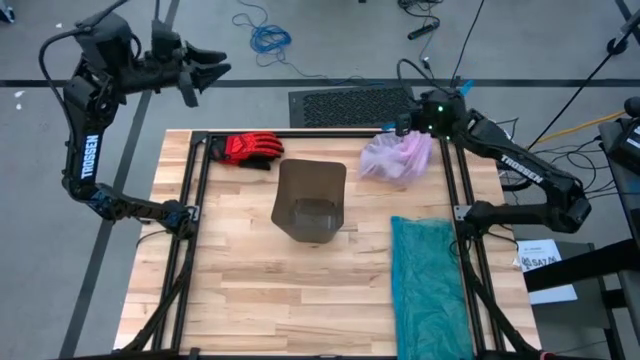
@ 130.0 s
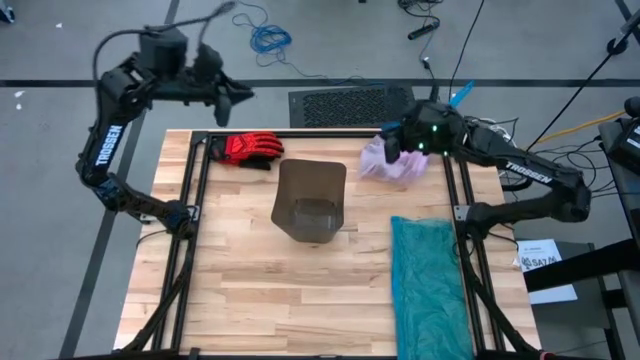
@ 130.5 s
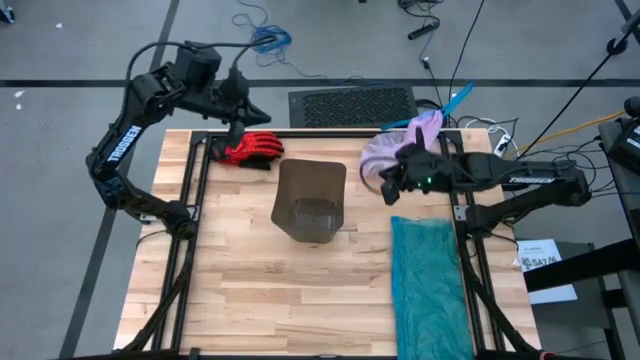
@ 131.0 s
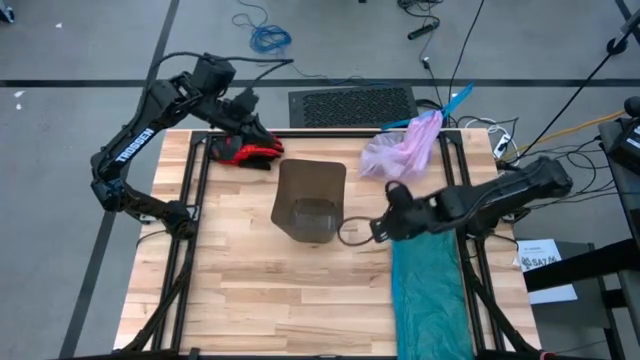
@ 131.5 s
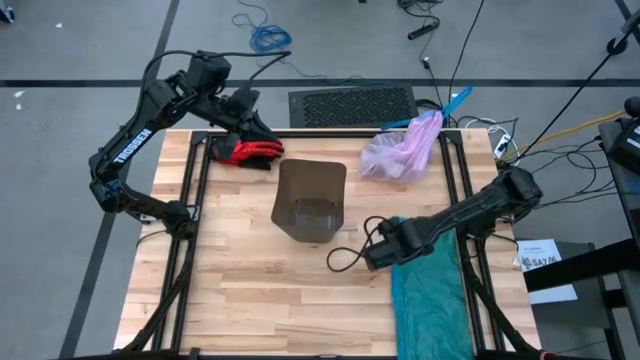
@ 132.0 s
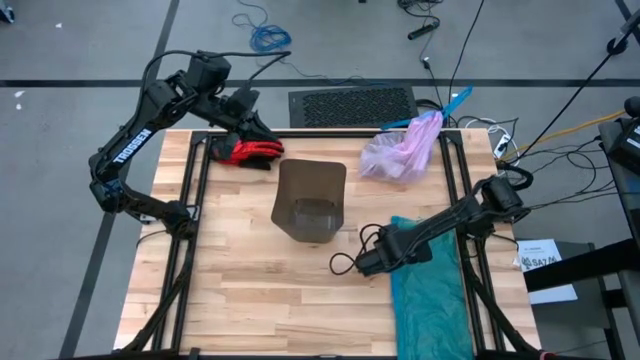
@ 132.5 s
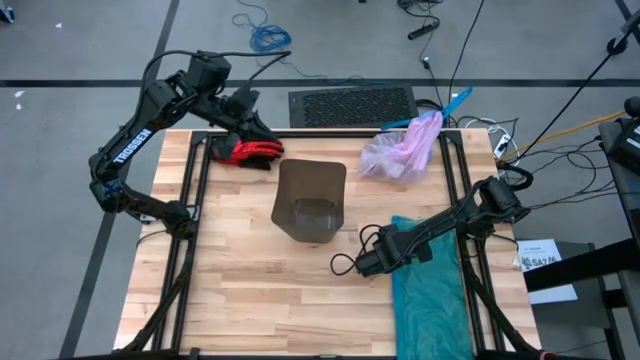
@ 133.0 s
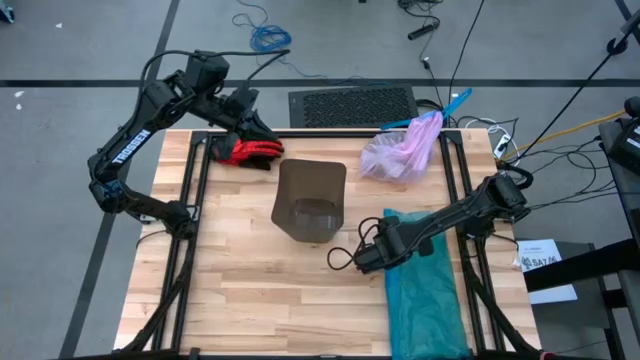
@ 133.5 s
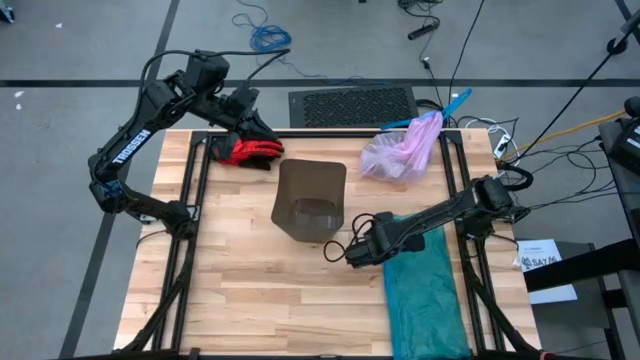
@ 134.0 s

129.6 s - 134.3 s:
Task: place trash/remove bag and relplace
Insert the new blue trash bag into the trash bin

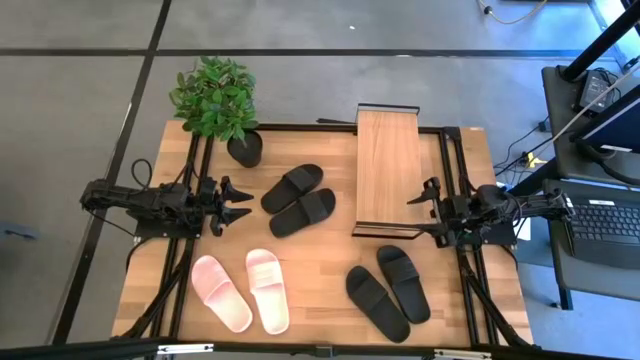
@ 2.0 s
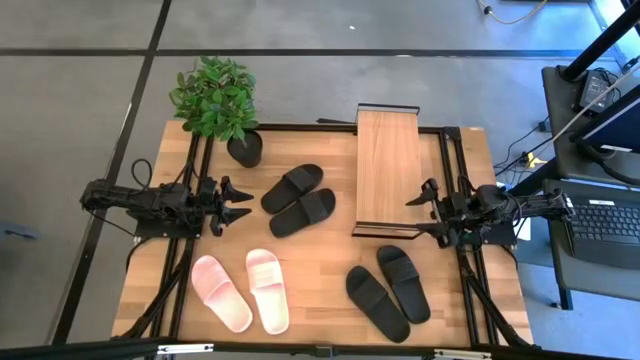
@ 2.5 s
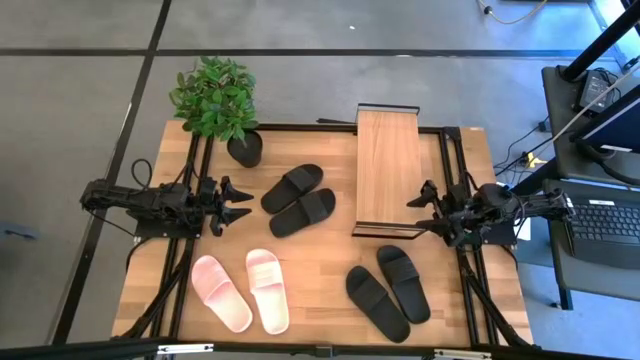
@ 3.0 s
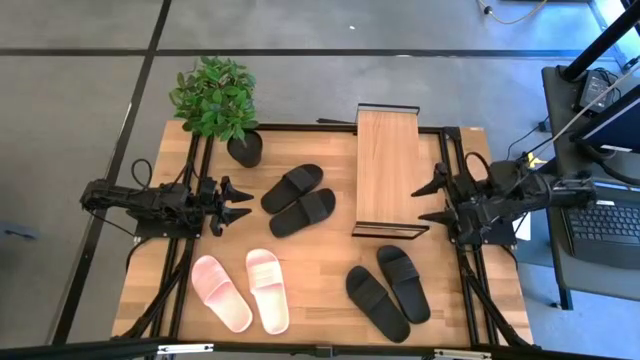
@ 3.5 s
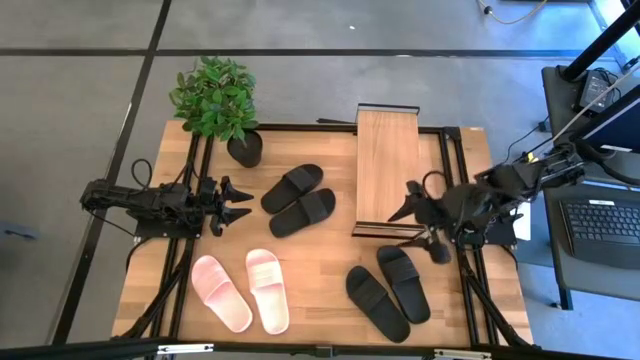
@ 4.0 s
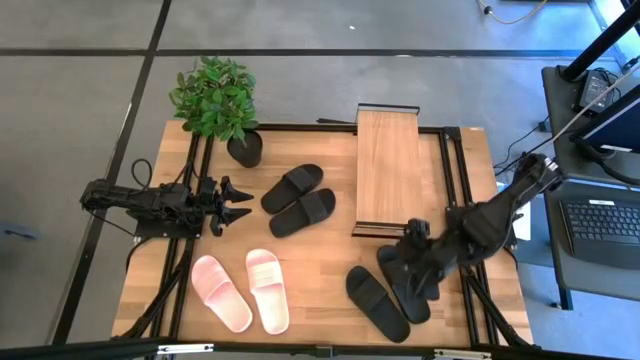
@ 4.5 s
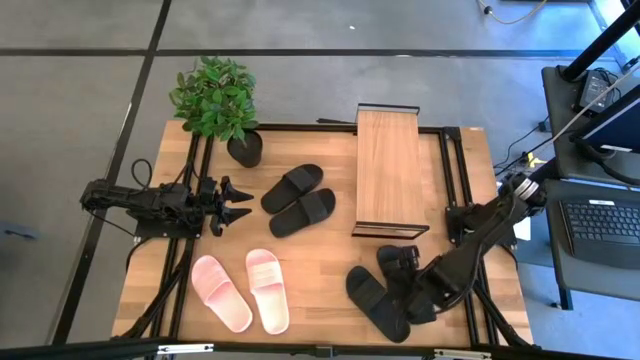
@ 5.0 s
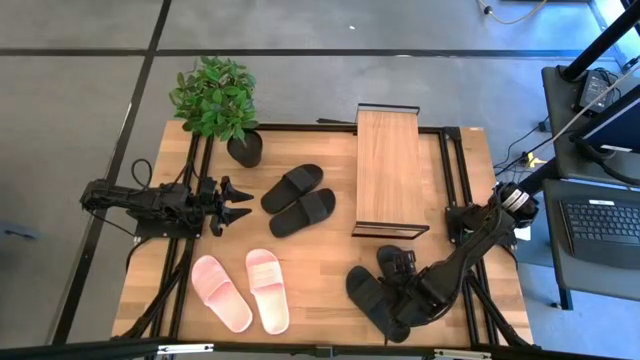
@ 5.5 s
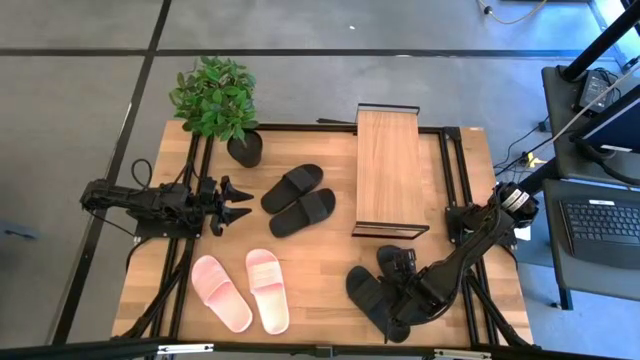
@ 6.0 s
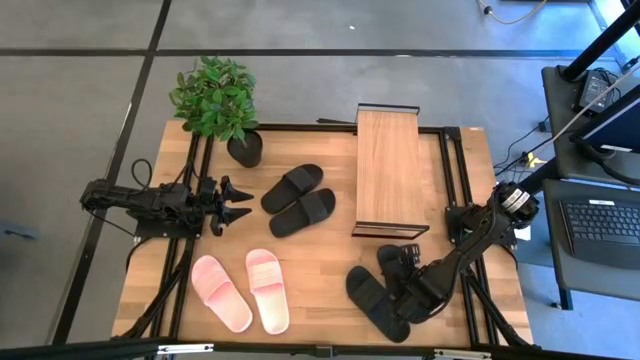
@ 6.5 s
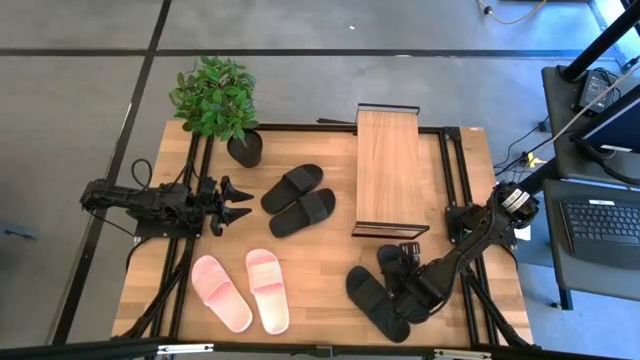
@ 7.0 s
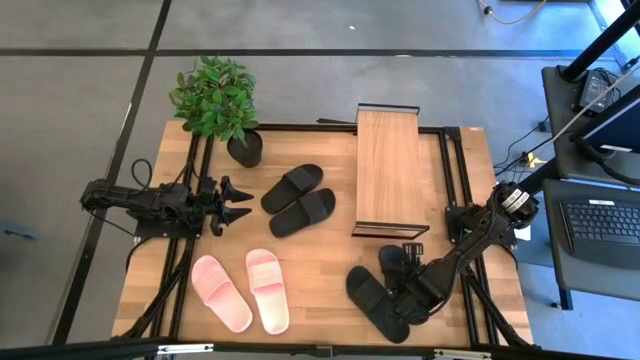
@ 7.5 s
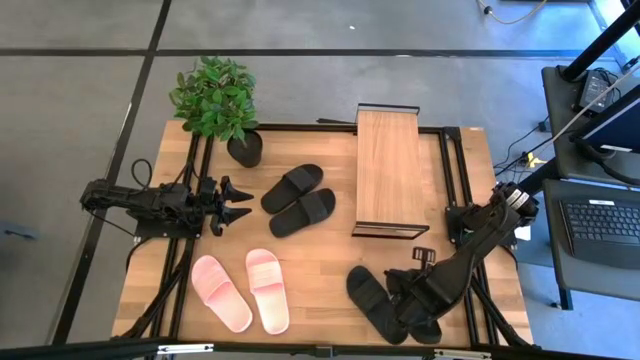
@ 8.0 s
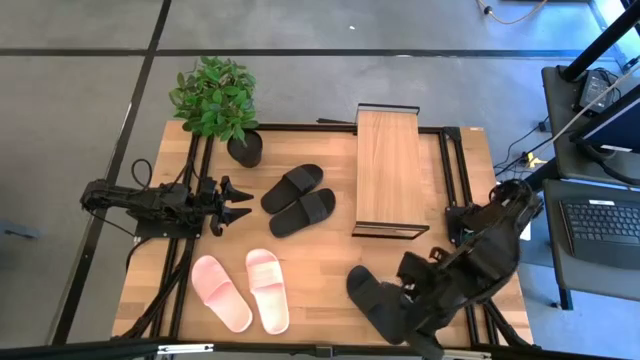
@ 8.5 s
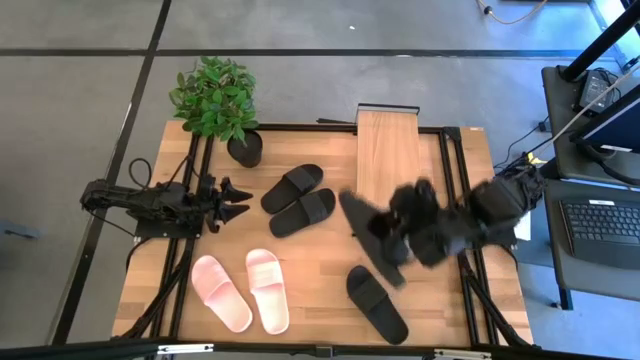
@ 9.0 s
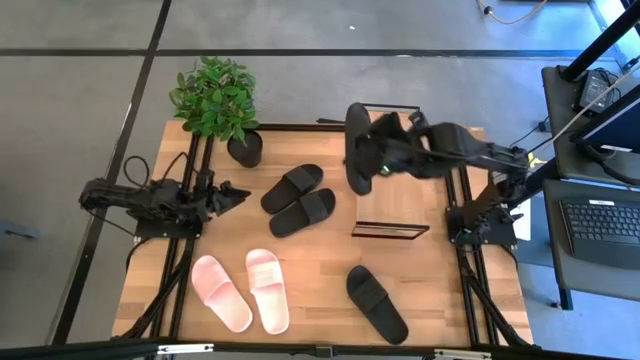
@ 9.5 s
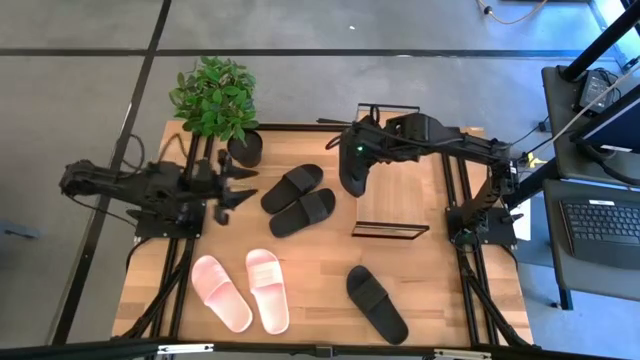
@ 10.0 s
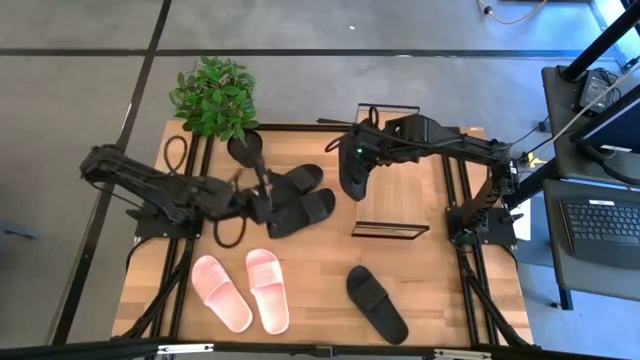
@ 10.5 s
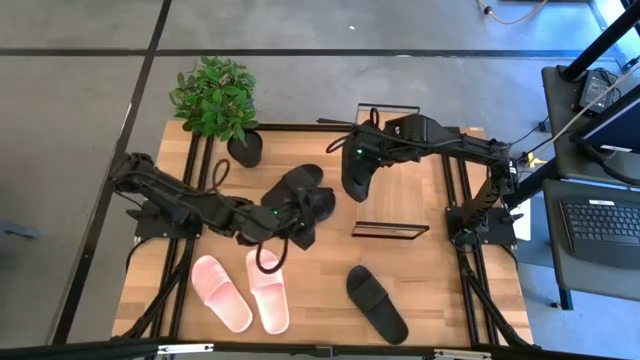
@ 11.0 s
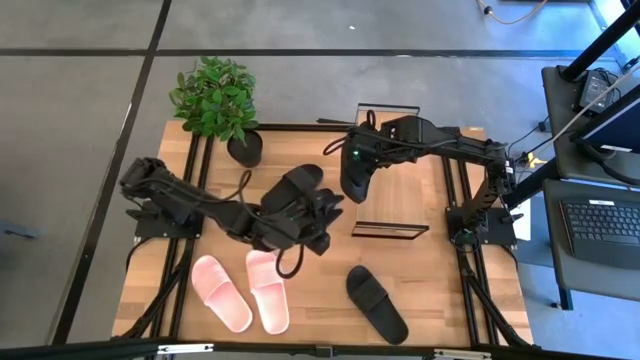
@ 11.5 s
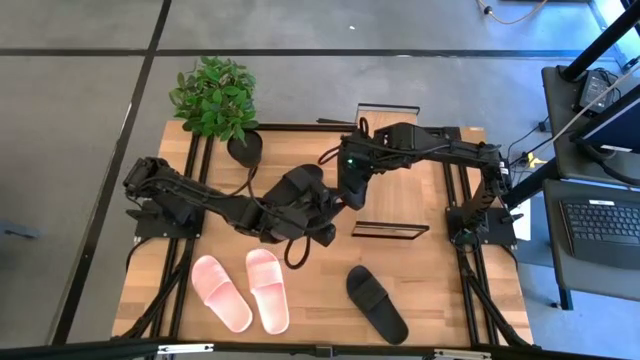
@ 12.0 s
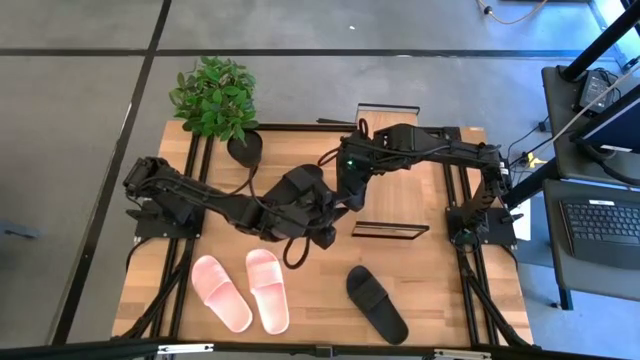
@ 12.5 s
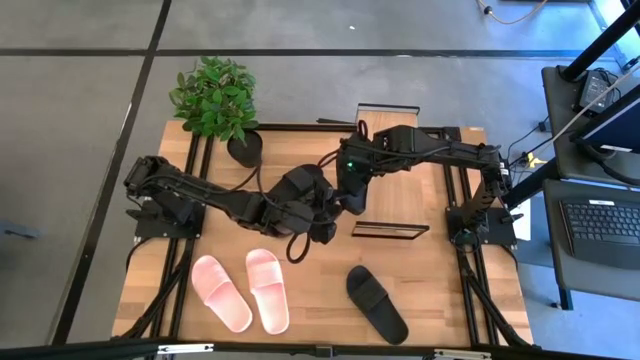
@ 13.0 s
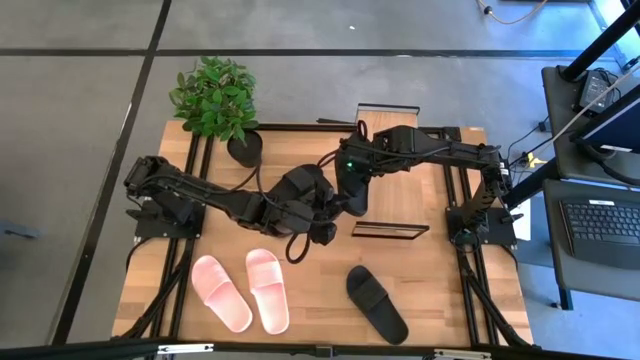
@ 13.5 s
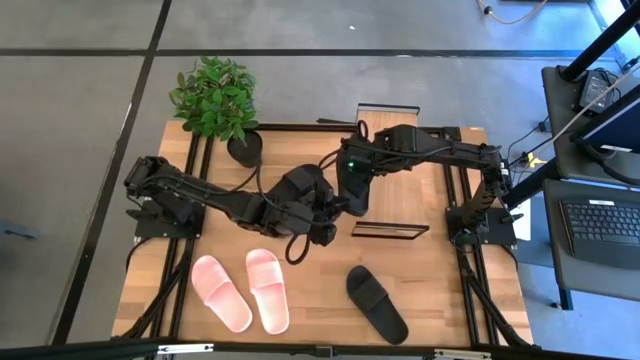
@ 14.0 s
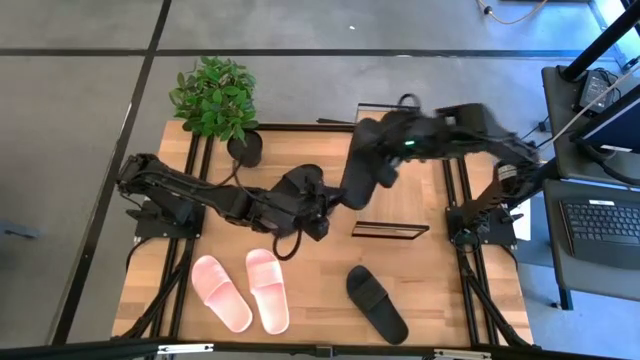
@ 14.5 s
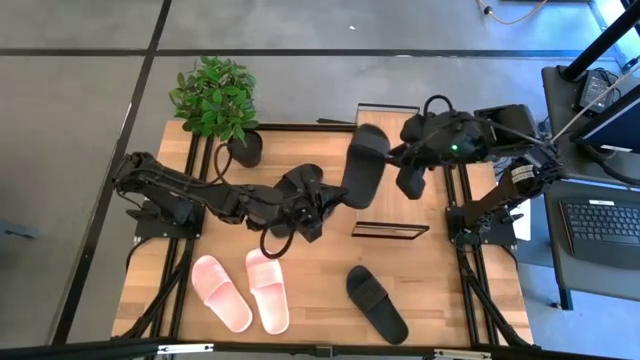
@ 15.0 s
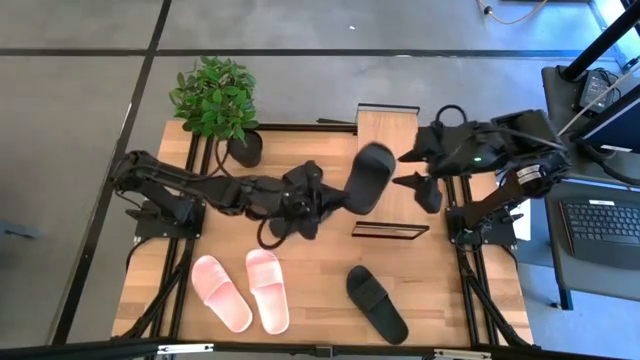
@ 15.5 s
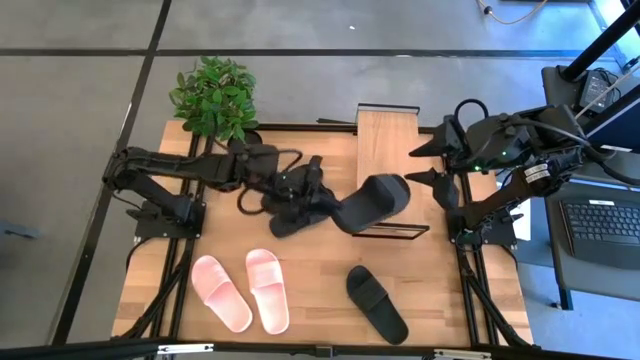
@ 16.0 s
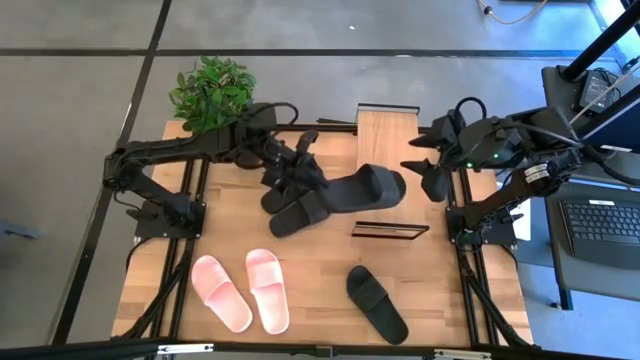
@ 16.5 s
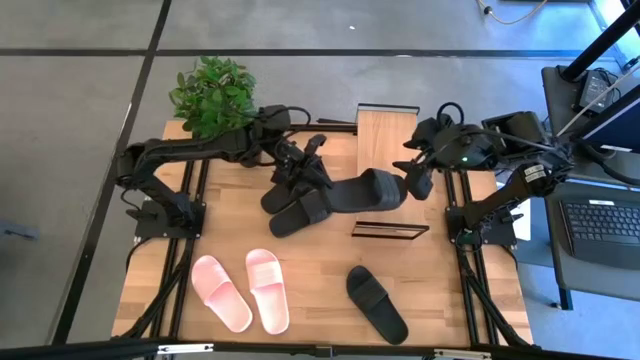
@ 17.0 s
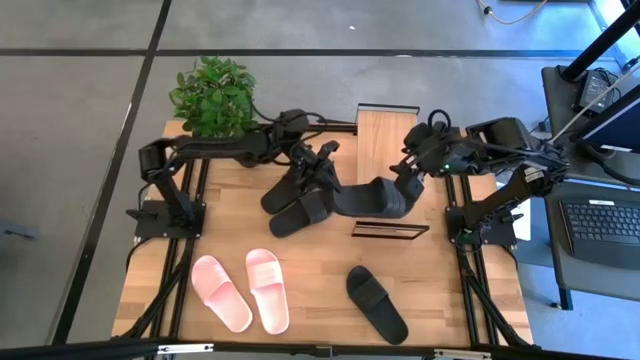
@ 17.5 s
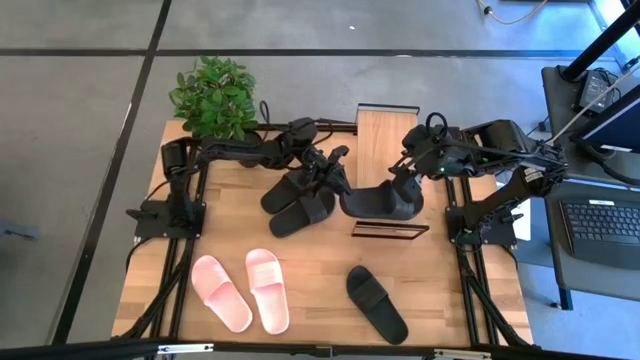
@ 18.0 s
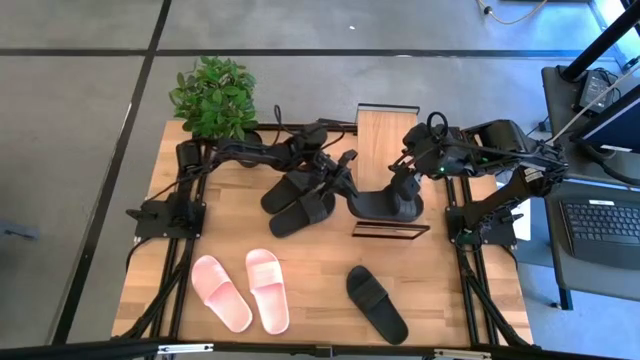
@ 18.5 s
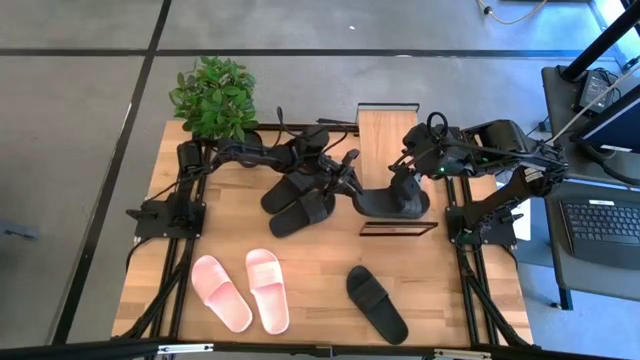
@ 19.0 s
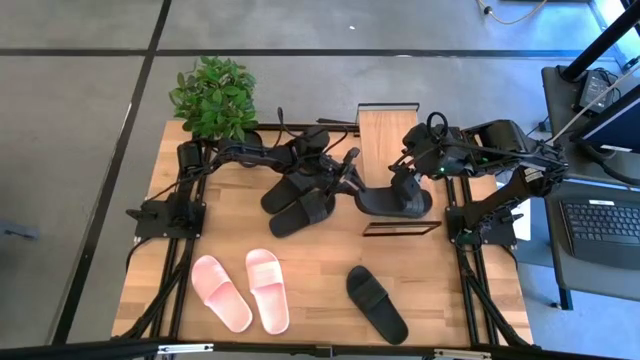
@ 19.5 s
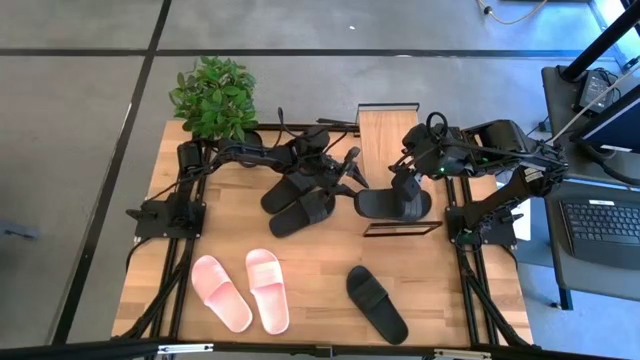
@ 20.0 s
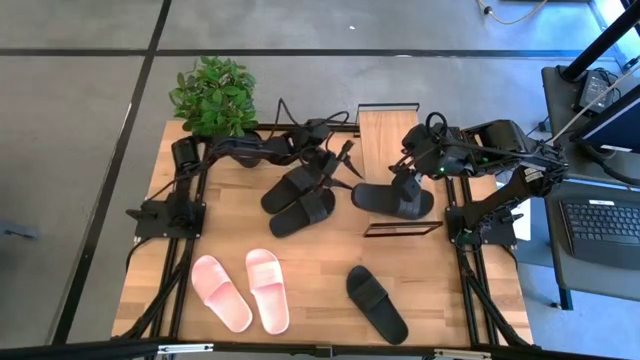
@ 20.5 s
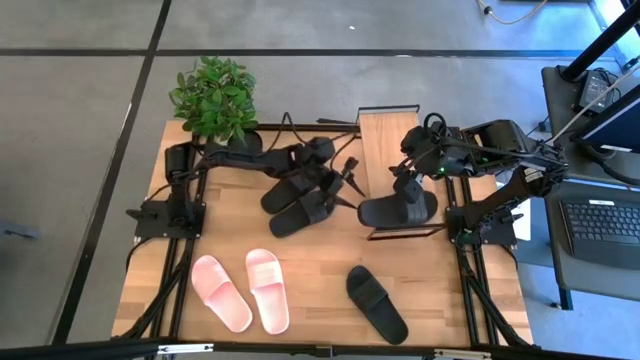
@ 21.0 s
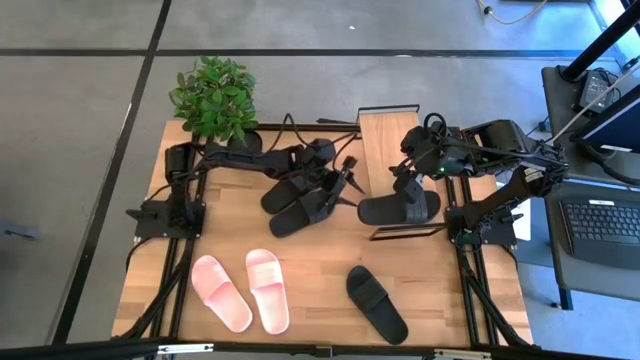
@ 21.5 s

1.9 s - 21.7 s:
Task: Pick and place slides into the shelf
Put the black slide on the shelf
